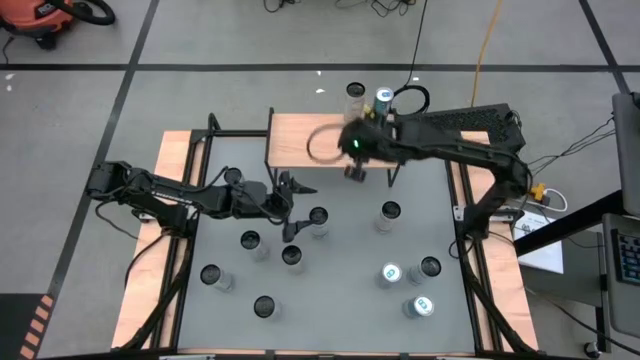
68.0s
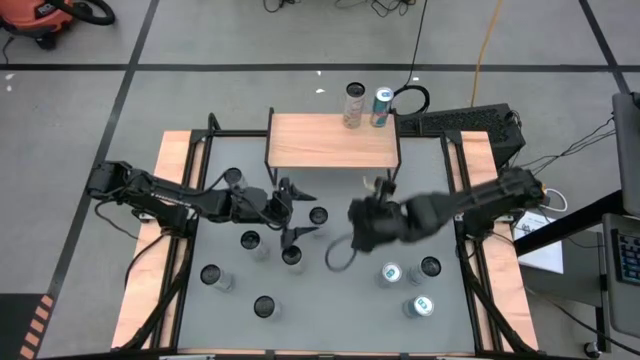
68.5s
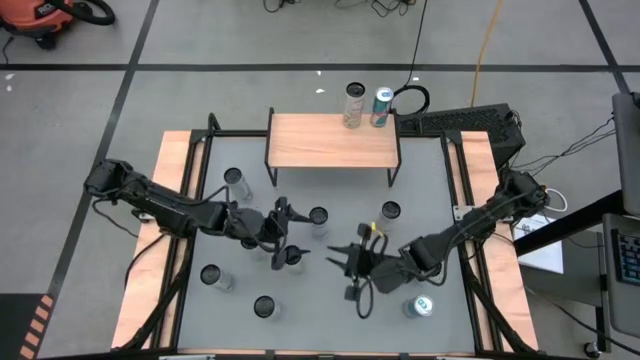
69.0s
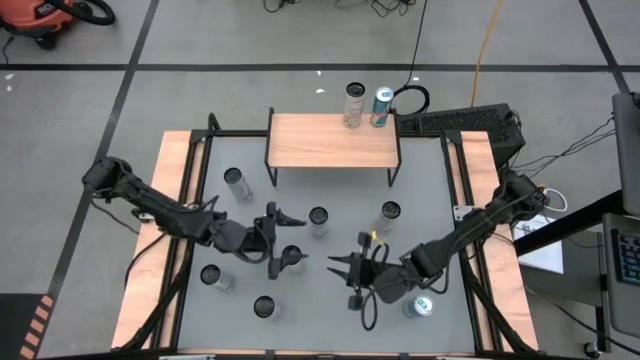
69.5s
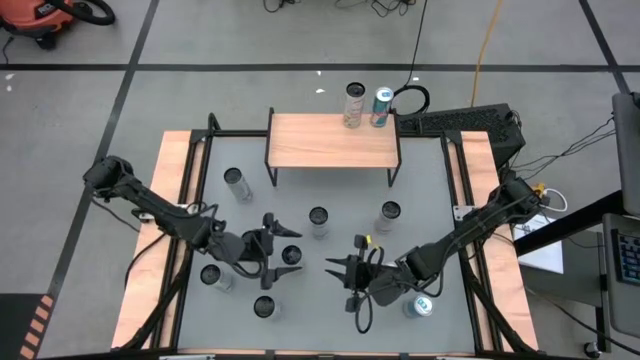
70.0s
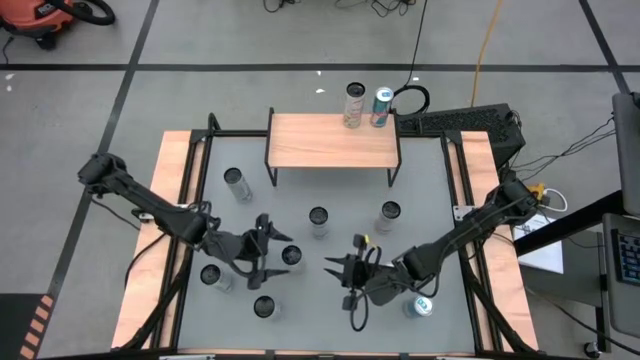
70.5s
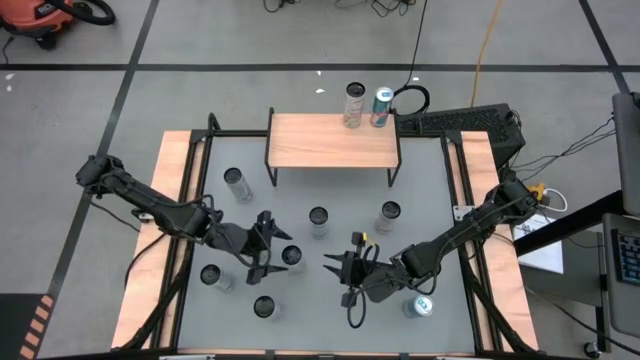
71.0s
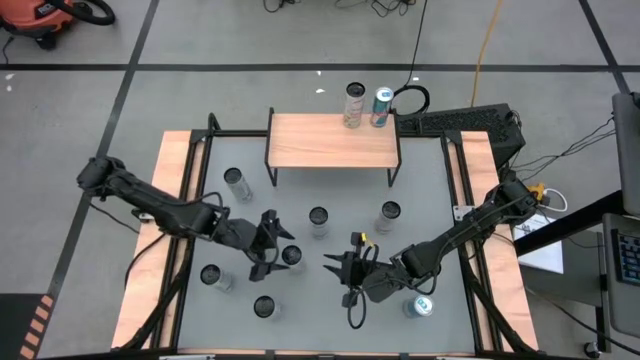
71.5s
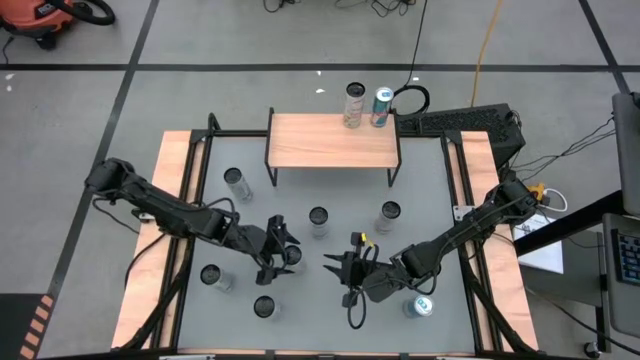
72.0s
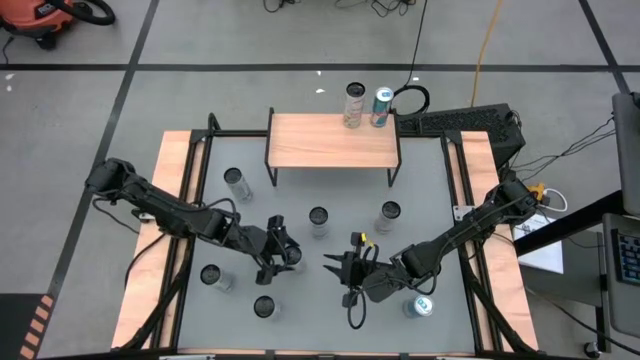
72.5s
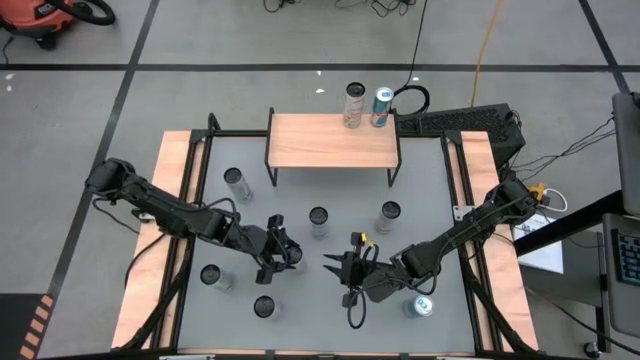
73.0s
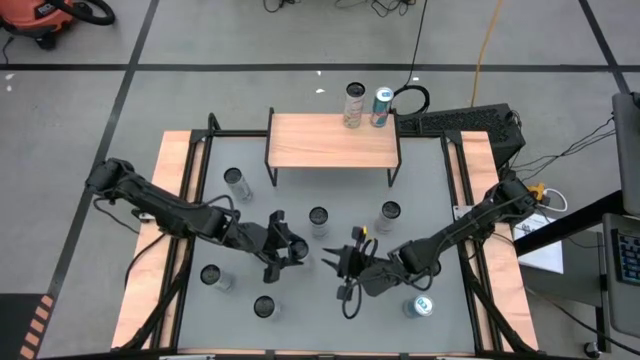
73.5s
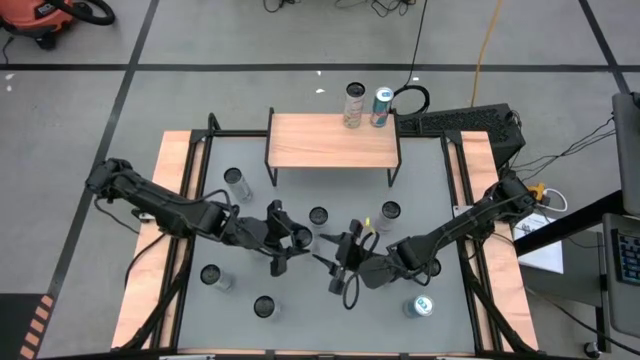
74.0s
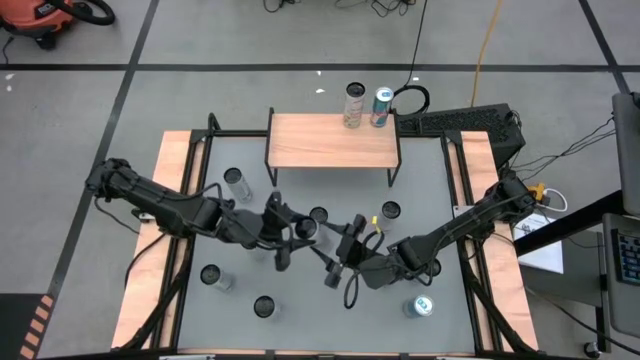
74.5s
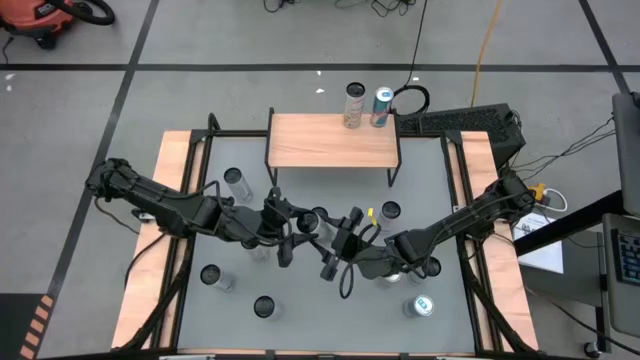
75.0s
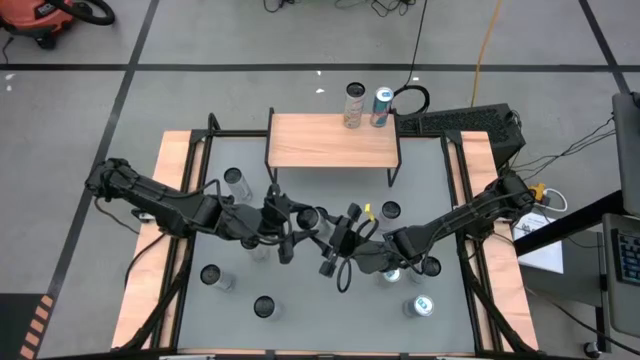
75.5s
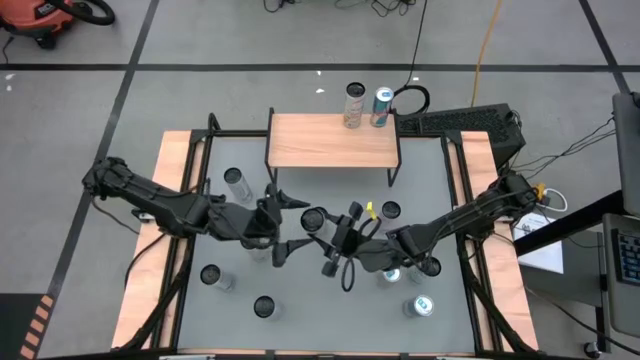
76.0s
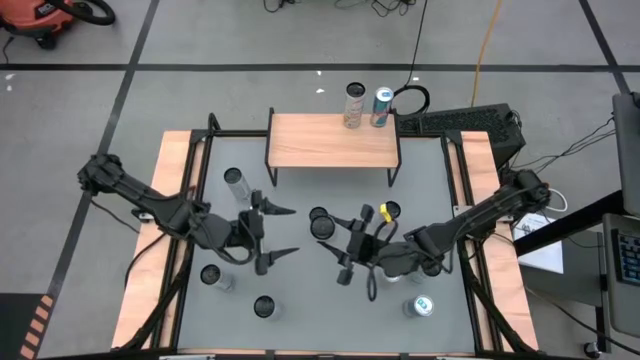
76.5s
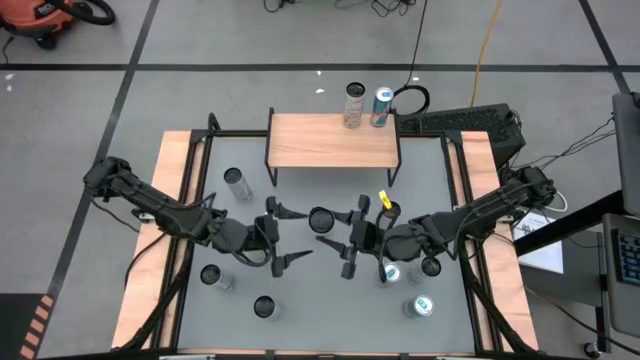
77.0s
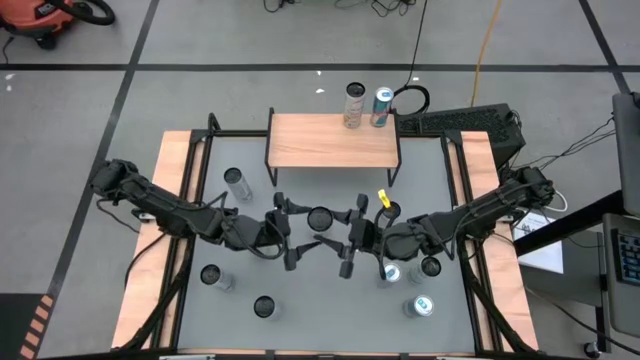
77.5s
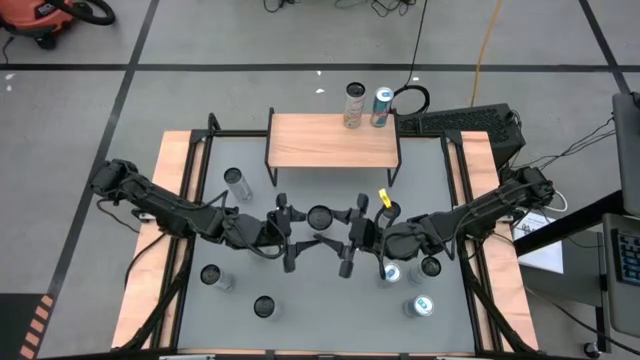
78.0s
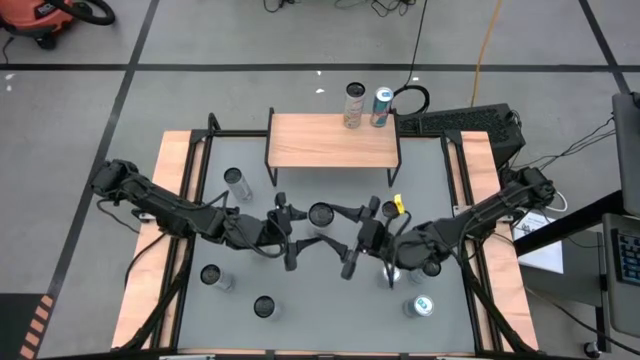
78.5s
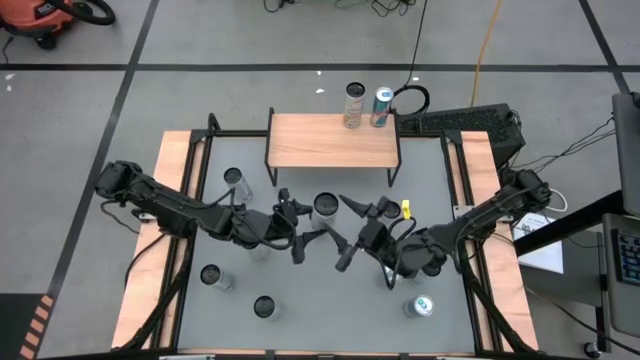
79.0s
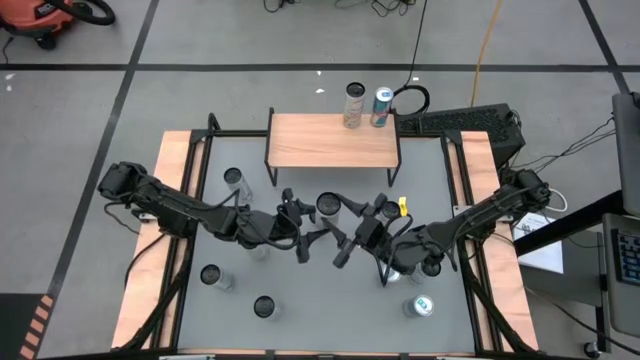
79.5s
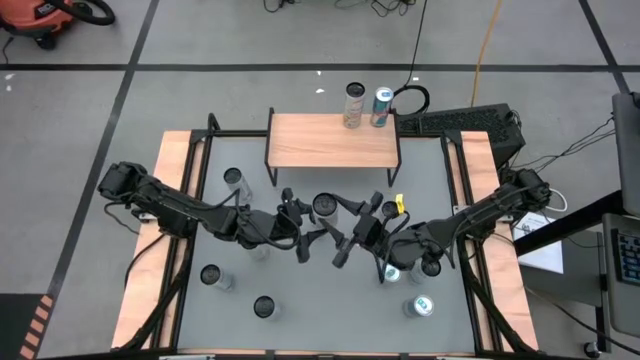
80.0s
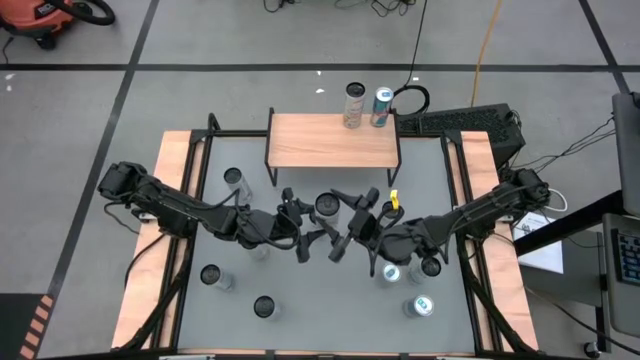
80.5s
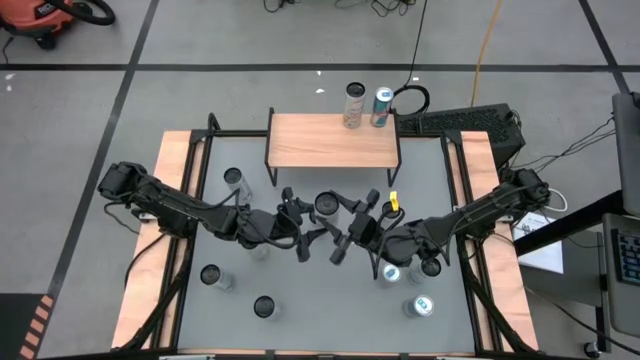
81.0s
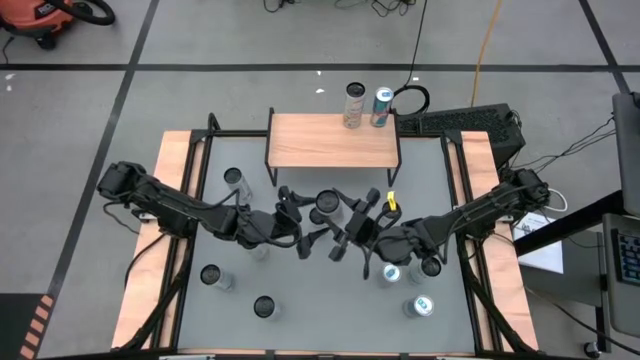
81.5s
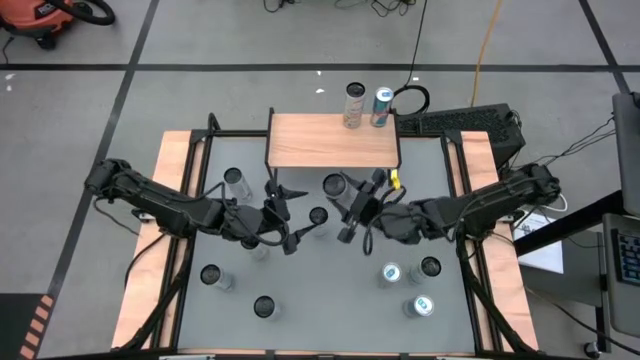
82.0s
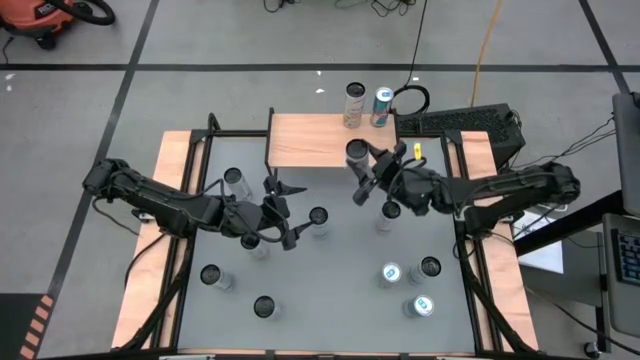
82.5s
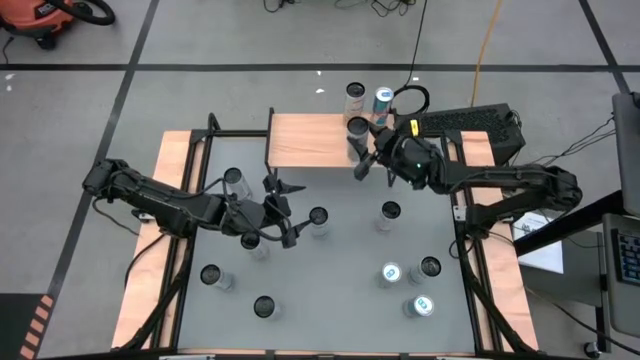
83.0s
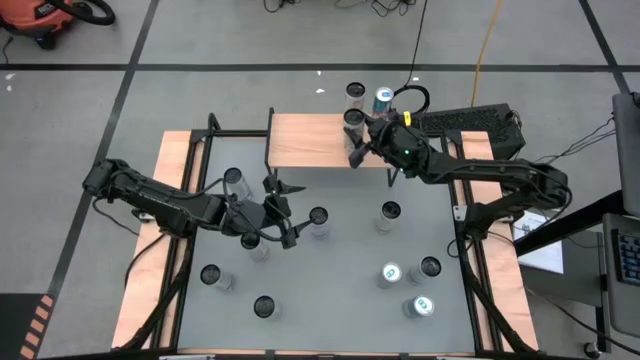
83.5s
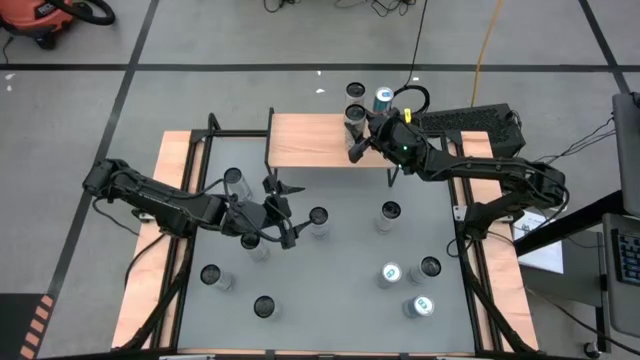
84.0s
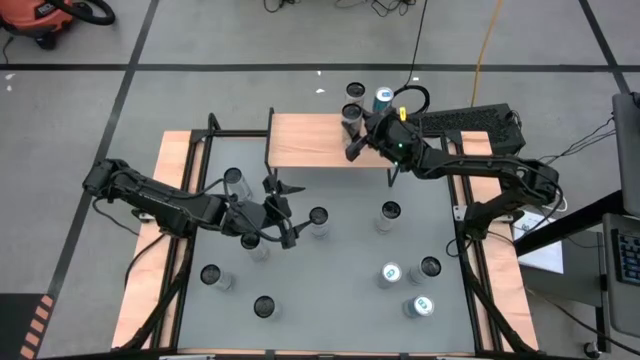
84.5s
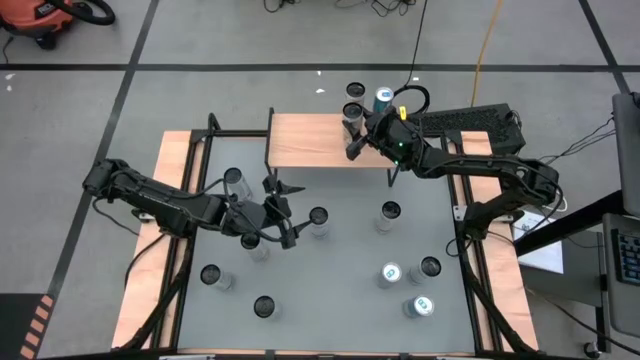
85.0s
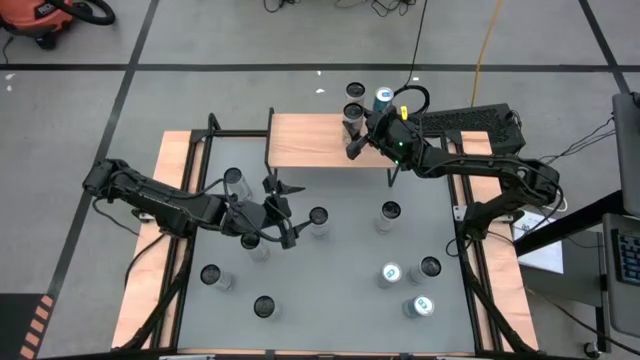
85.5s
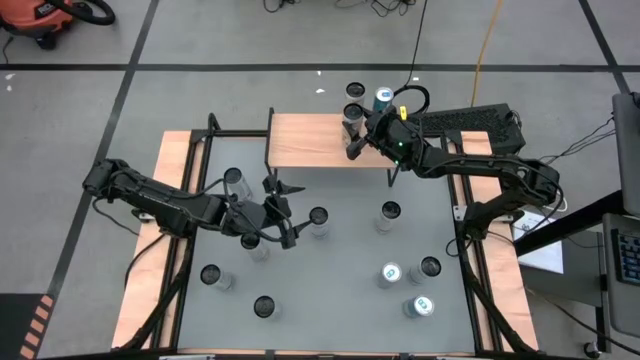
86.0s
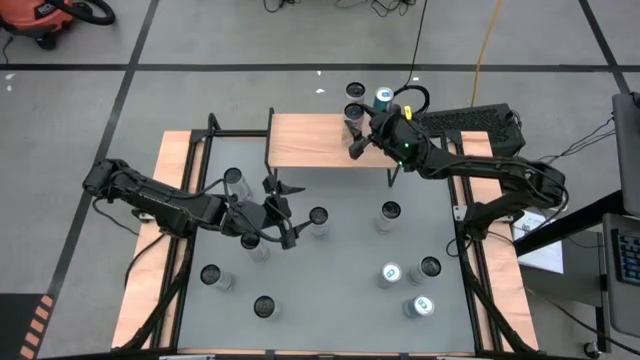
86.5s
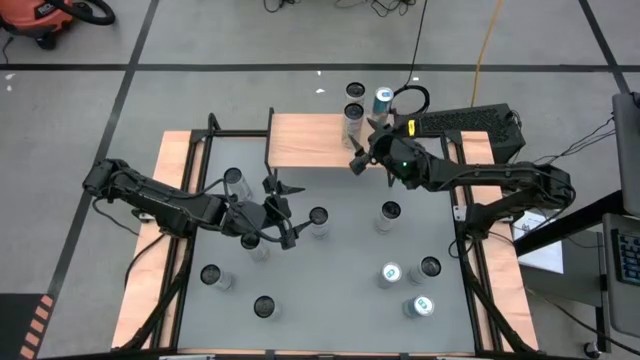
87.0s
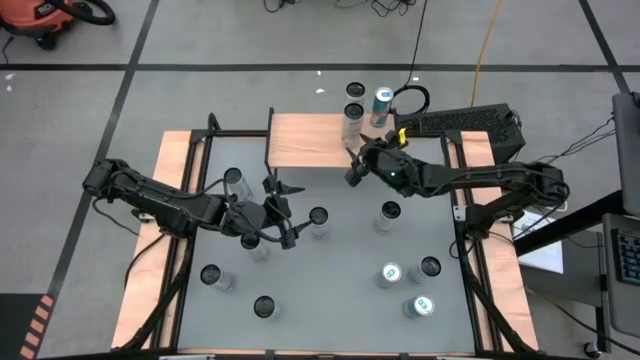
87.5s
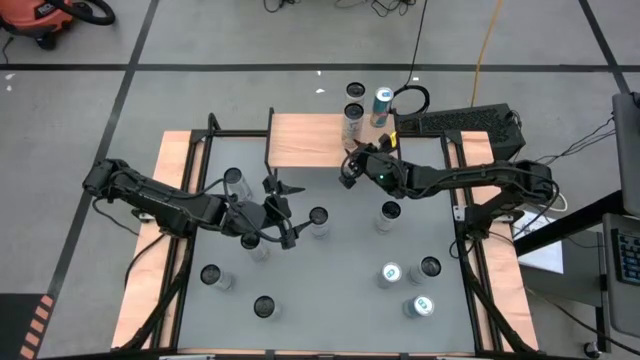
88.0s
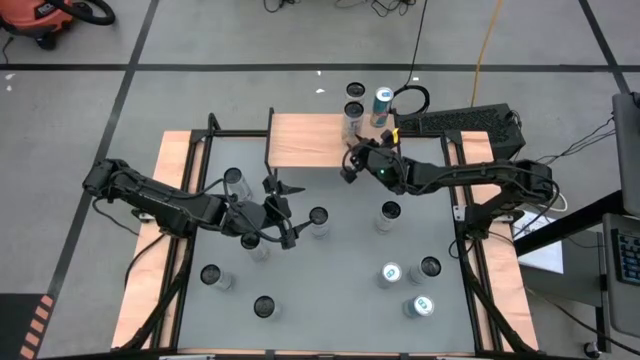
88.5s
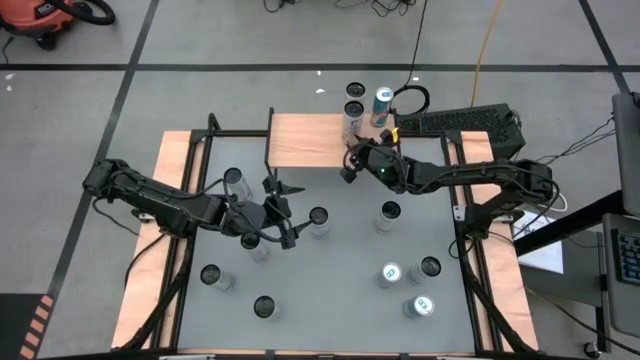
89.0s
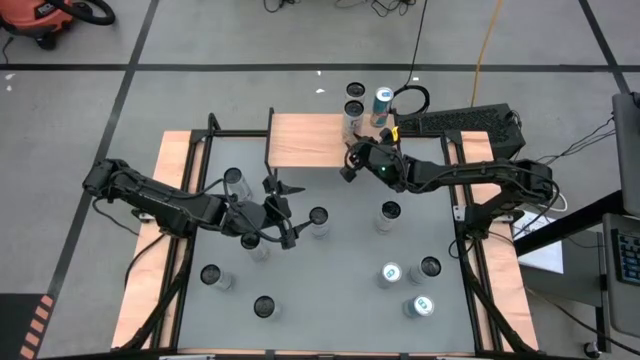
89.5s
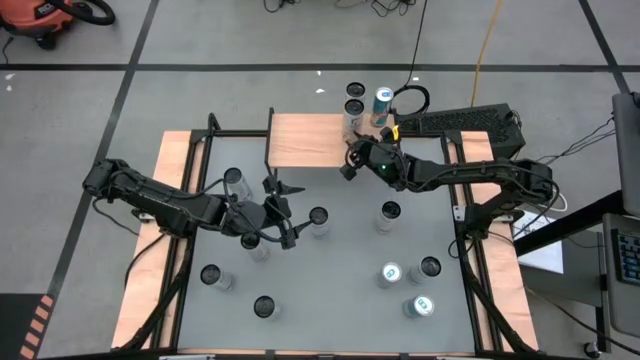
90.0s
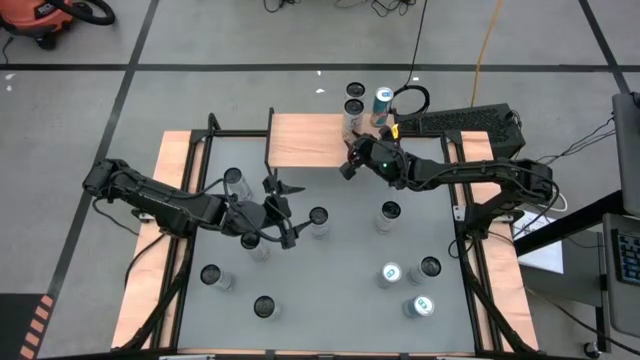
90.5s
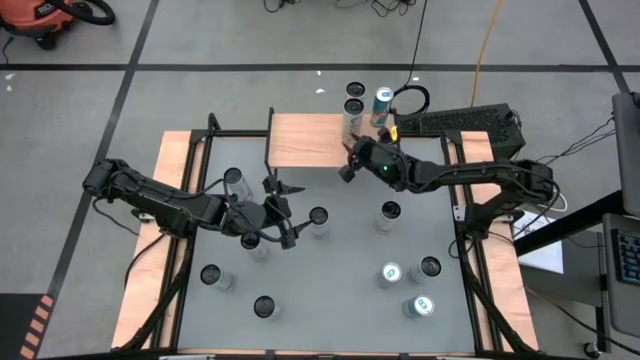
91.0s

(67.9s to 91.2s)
Task: Place canned beverage on shelf
Put the right white yellow soda can on the shelf aligned with the other white yellow soda can
